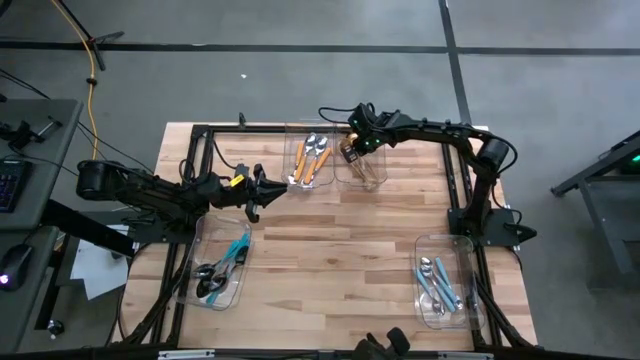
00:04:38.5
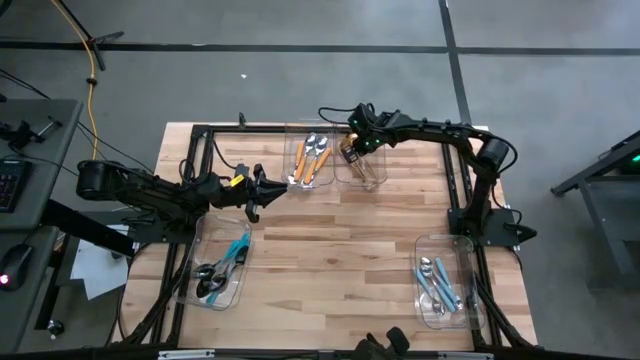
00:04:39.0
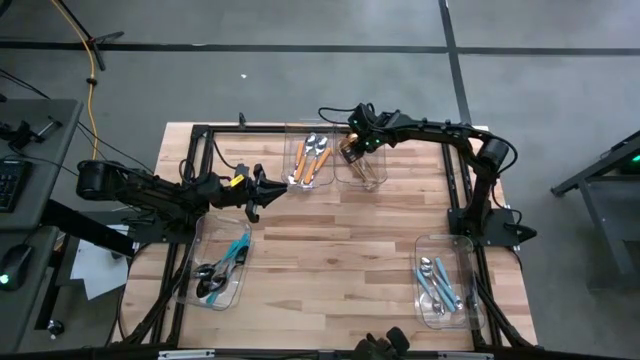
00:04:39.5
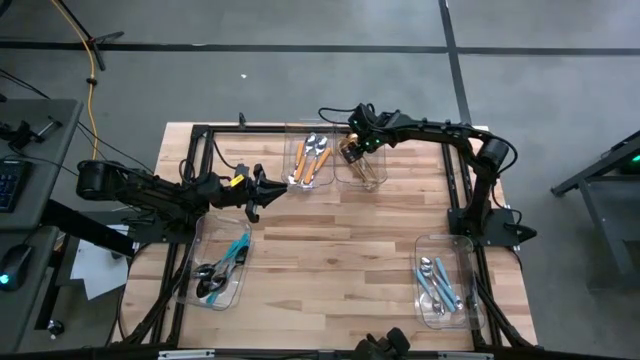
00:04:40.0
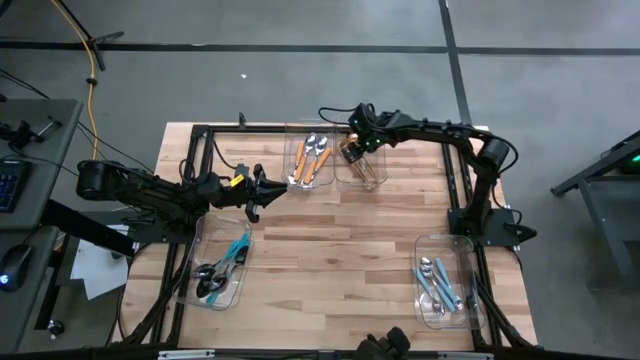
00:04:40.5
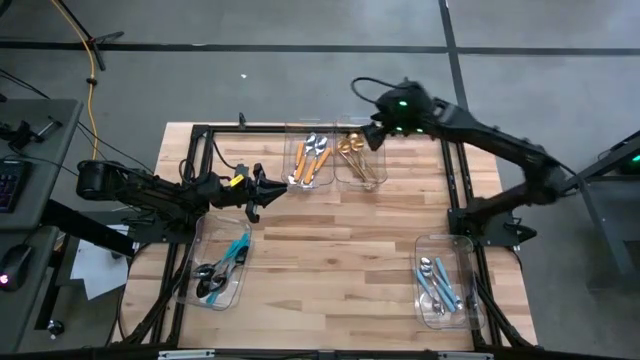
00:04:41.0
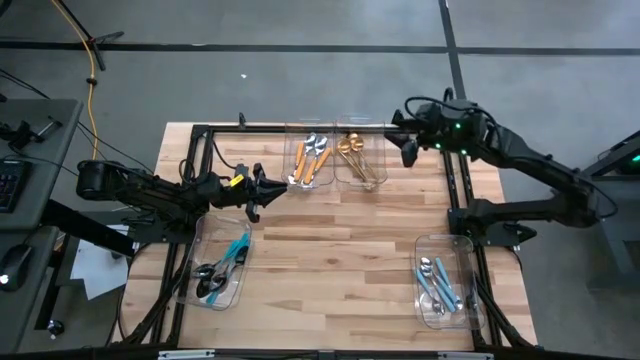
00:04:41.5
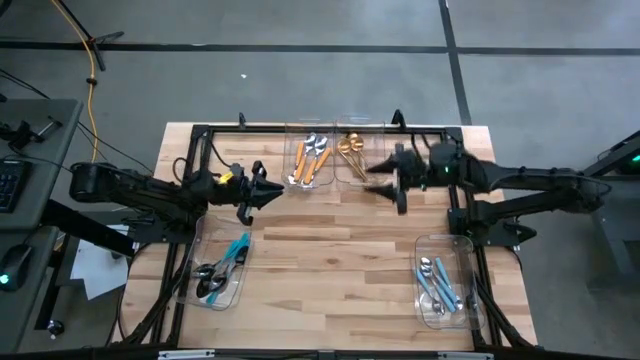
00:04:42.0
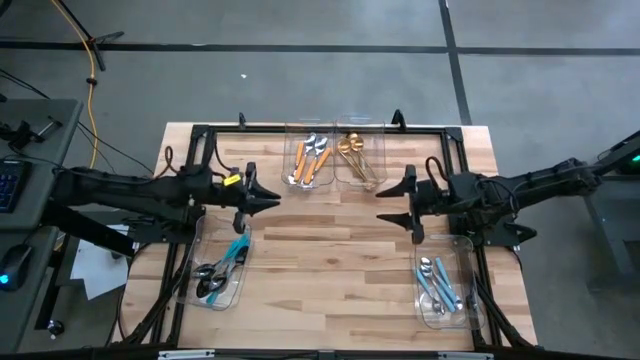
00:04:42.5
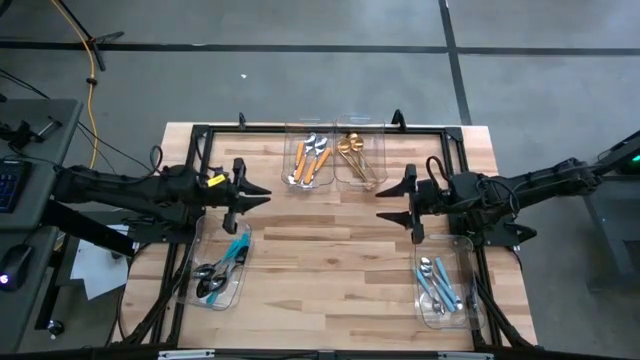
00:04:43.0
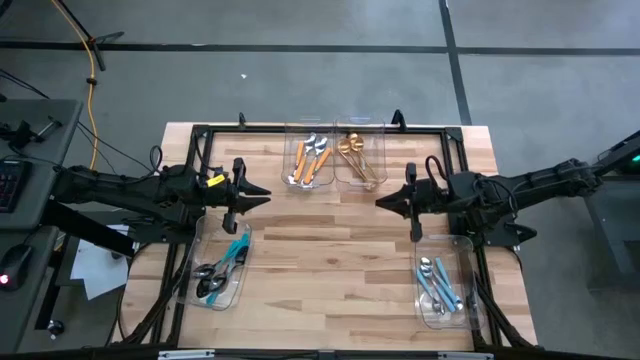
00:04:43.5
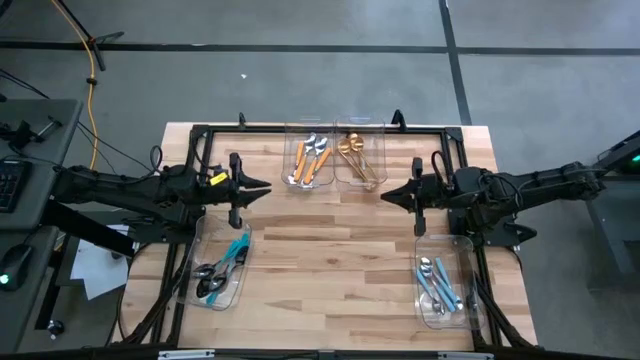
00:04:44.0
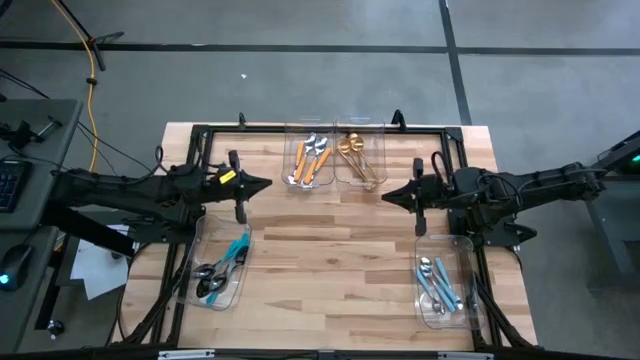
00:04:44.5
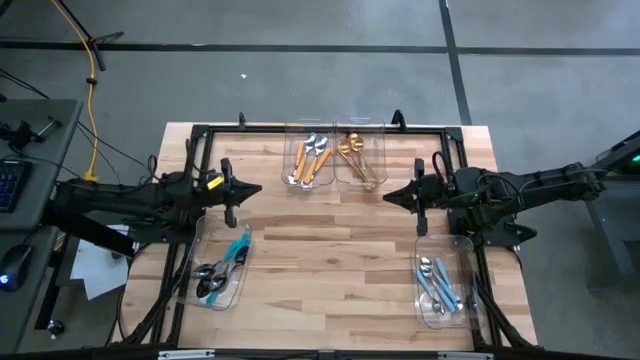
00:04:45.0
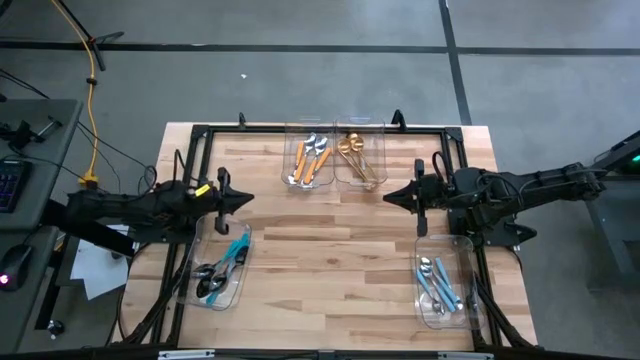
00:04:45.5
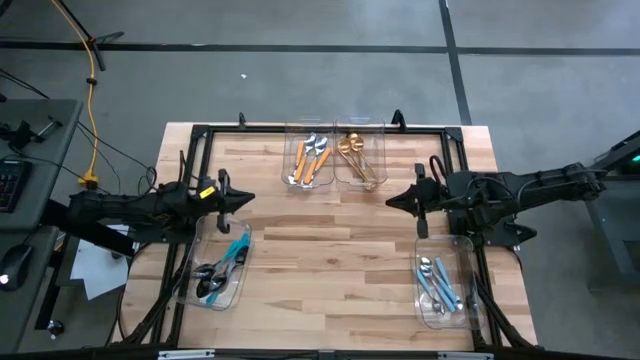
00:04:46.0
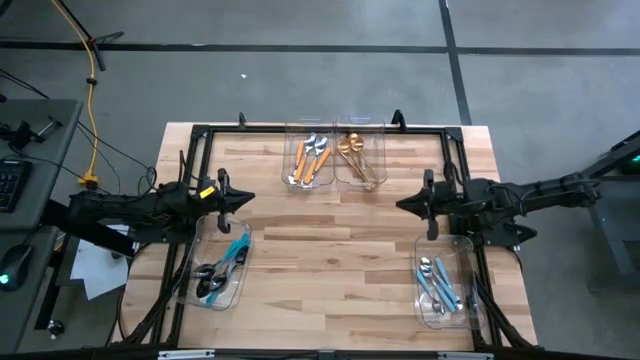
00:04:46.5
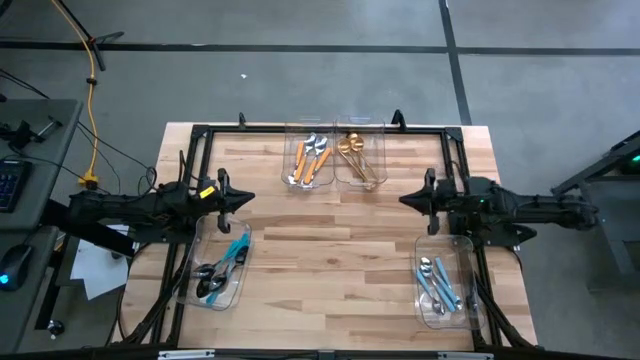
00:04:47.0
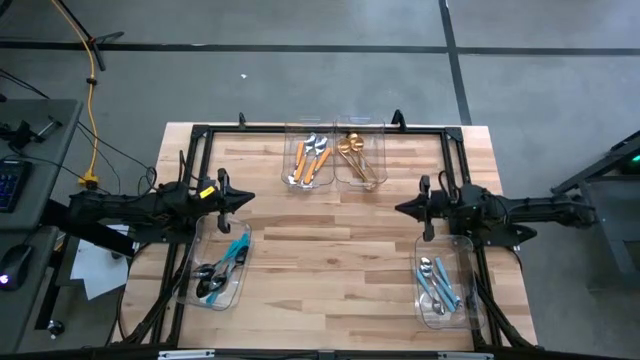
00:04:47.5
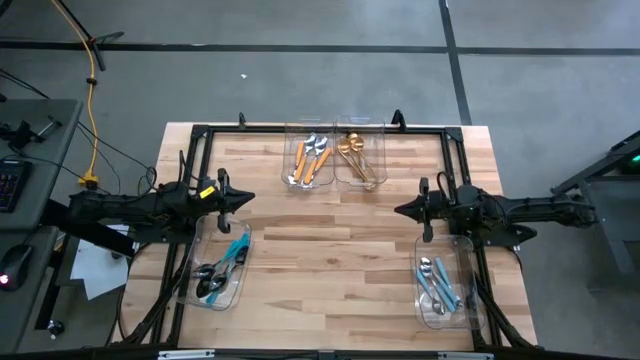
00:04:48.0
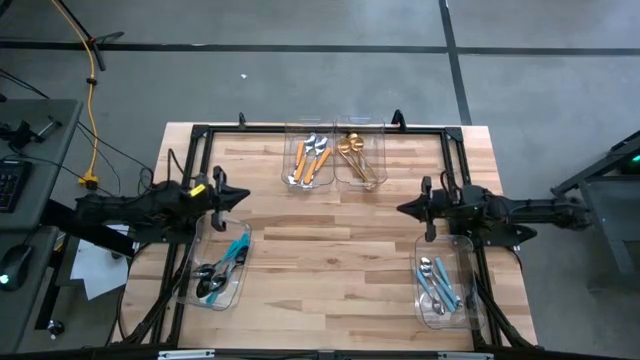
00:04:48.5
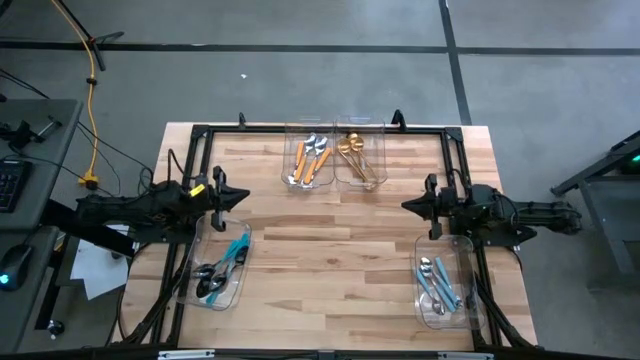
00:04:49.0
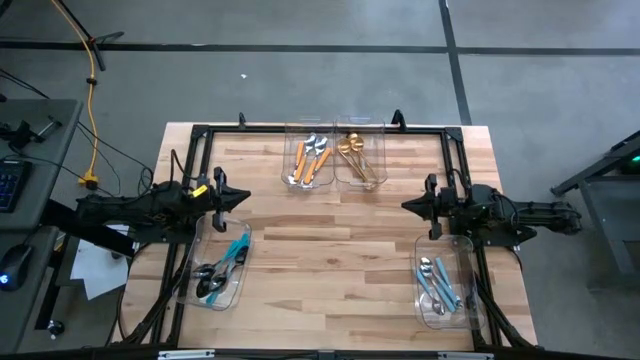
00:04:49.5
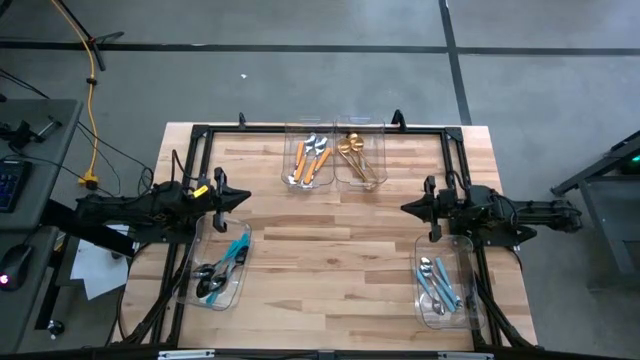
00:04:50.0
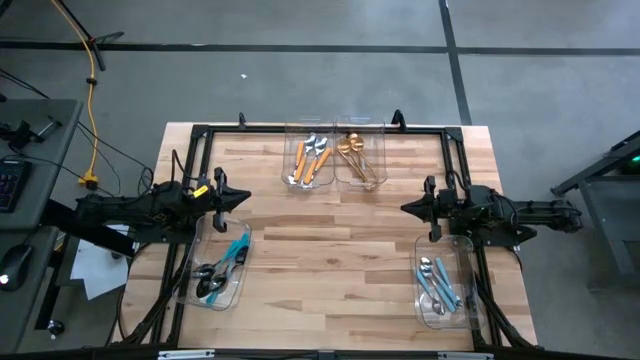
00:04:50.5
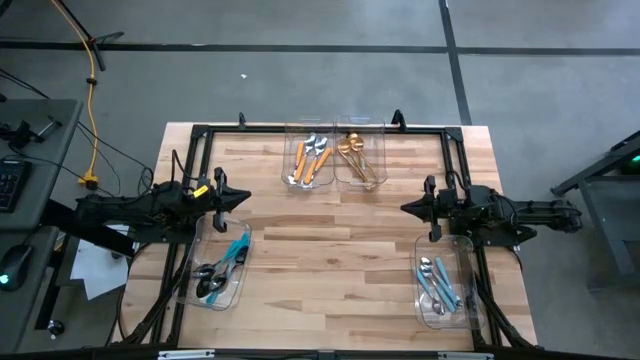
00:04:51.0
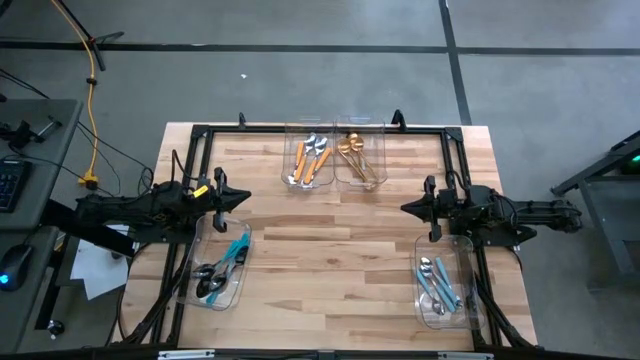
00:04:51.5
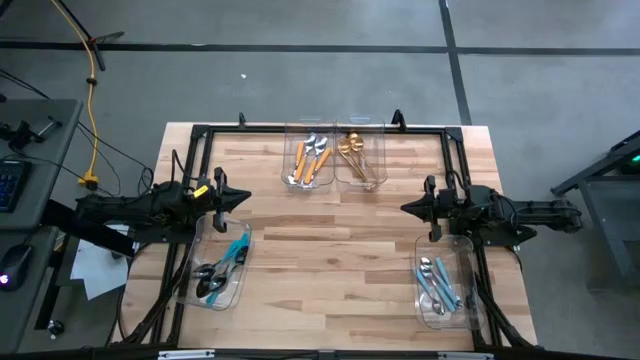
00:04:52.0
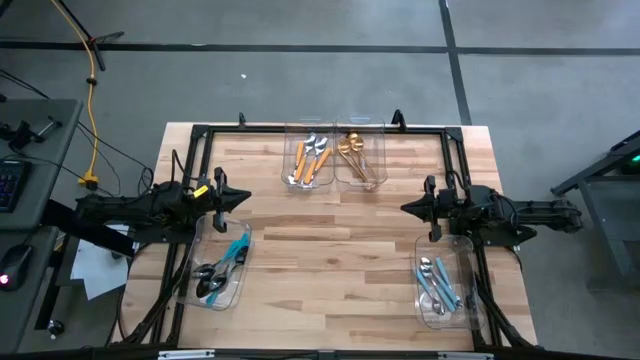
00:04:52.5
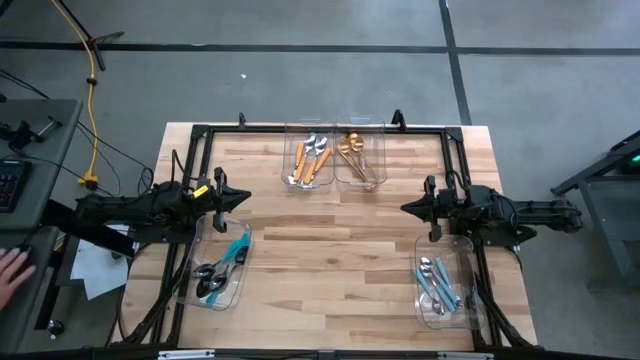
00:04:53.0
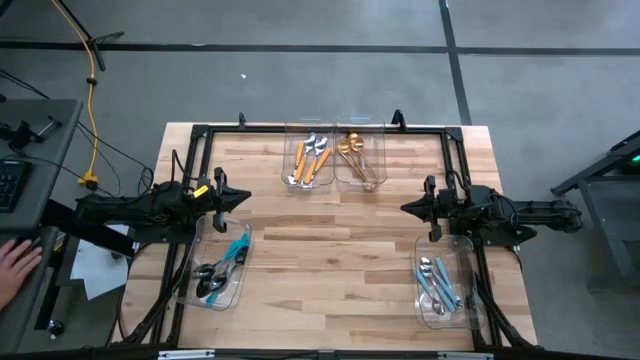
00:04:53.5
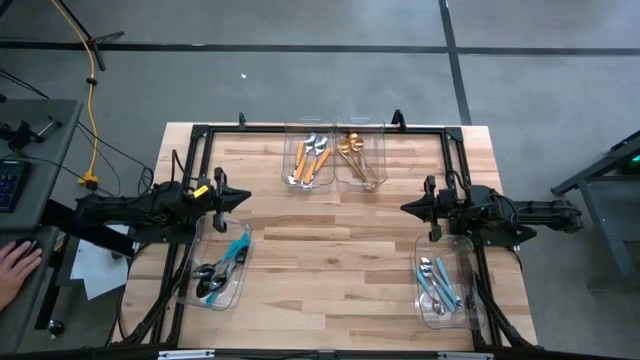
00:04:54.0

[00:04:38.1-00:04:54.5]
Task: Sort silverware by color (type)
Return to Home Position
